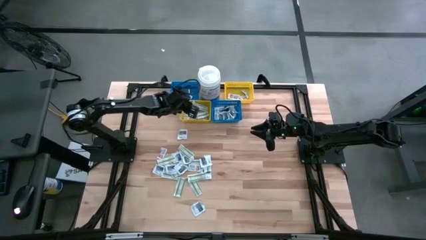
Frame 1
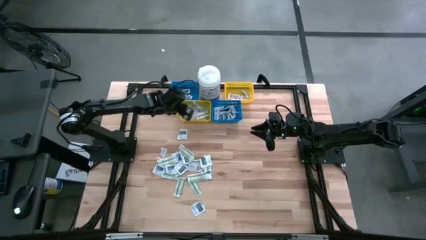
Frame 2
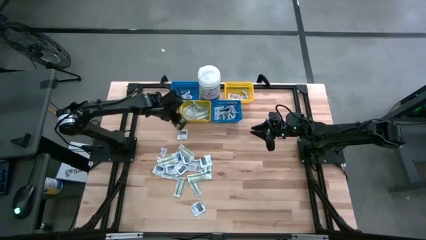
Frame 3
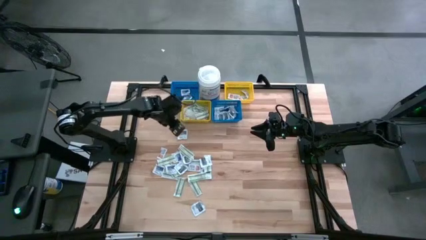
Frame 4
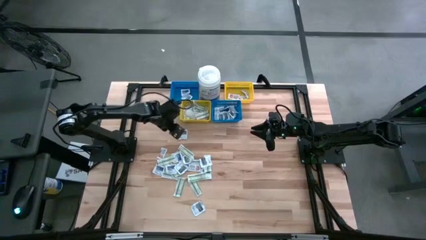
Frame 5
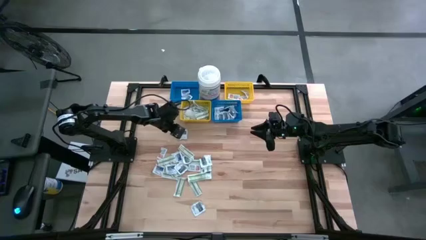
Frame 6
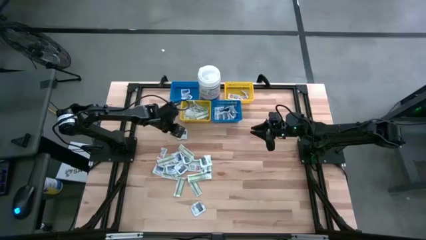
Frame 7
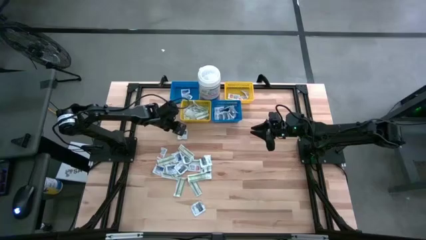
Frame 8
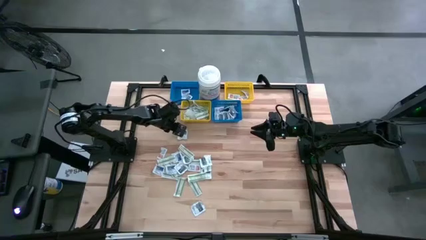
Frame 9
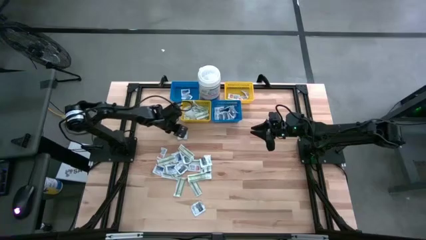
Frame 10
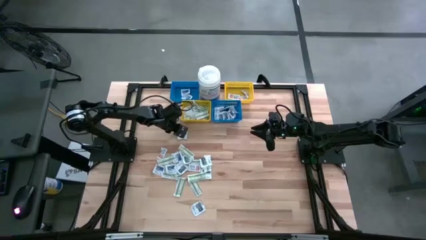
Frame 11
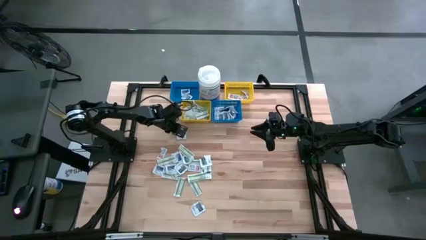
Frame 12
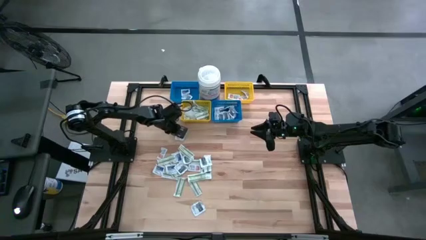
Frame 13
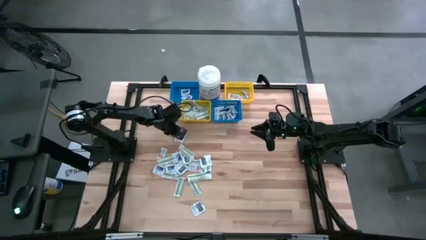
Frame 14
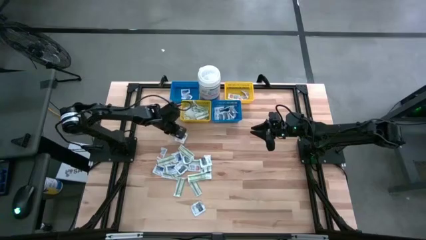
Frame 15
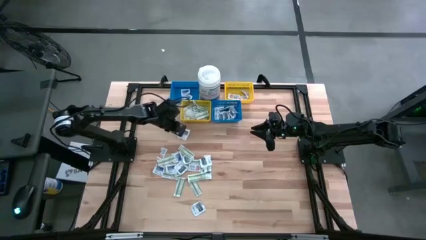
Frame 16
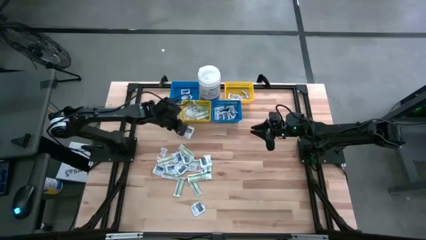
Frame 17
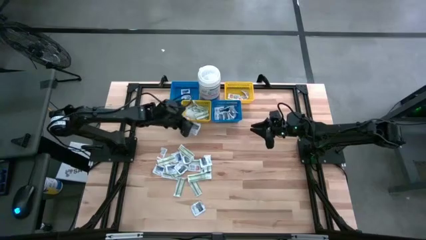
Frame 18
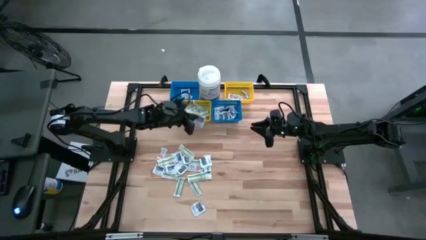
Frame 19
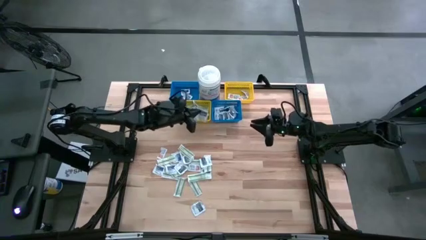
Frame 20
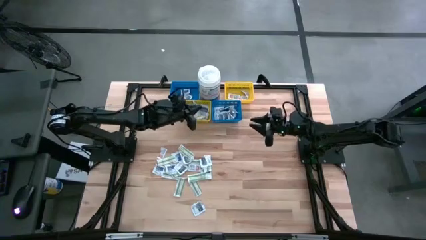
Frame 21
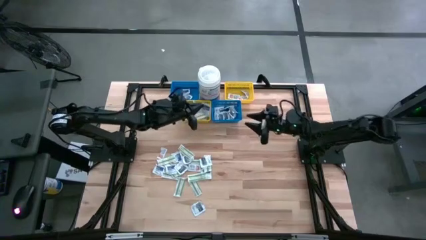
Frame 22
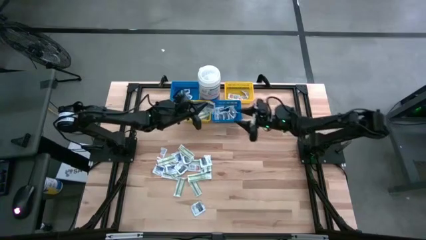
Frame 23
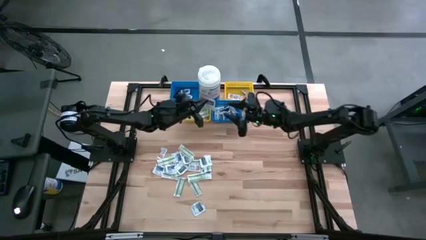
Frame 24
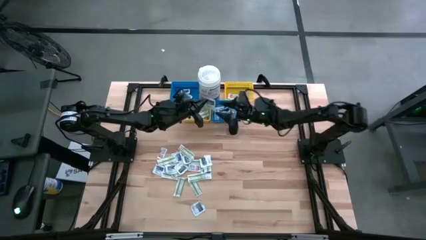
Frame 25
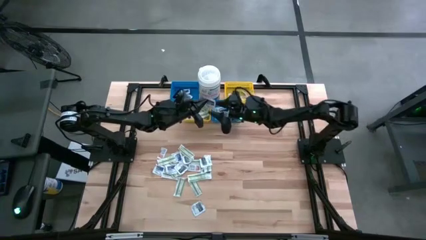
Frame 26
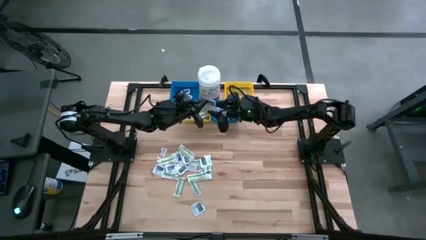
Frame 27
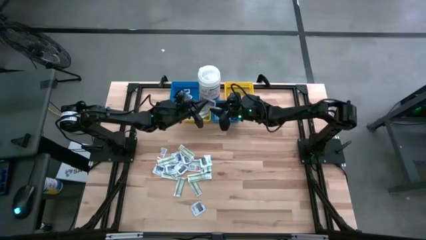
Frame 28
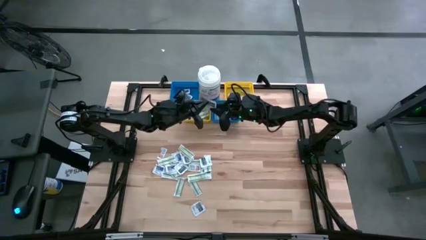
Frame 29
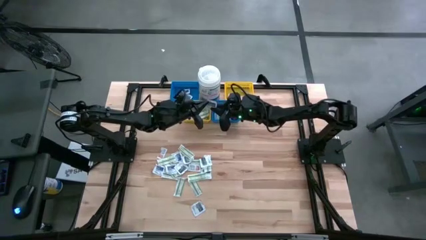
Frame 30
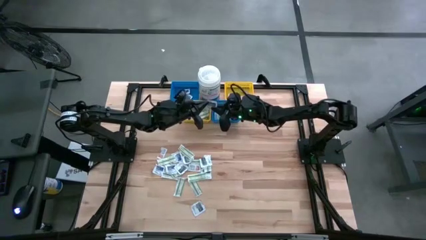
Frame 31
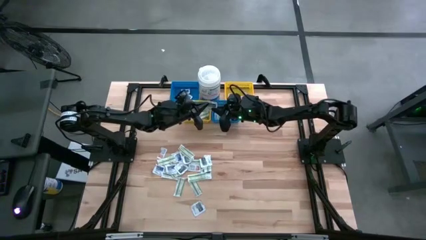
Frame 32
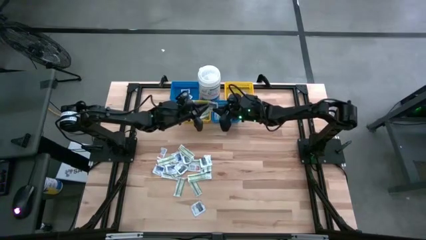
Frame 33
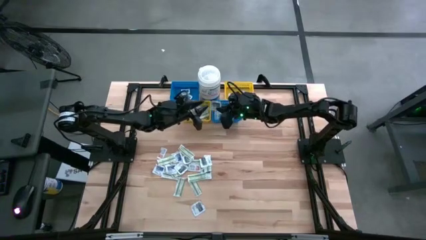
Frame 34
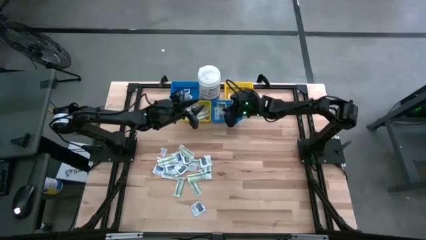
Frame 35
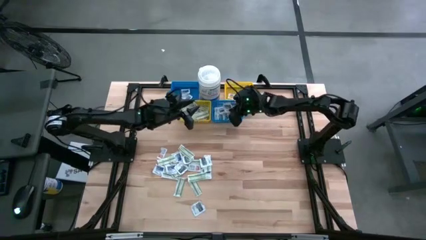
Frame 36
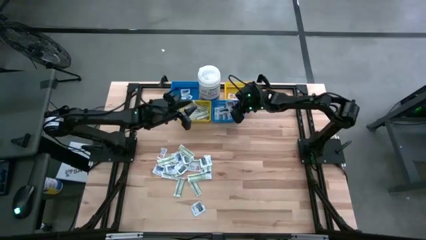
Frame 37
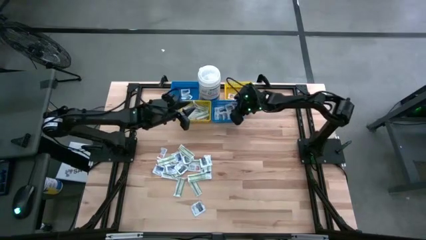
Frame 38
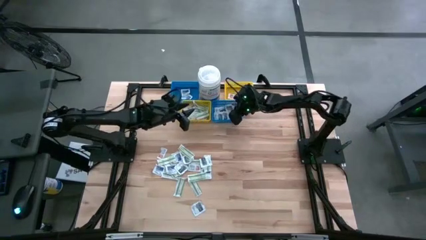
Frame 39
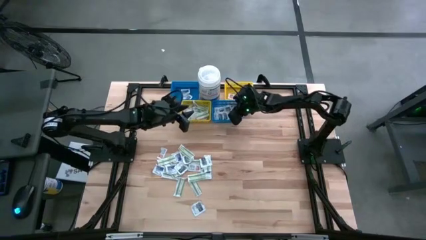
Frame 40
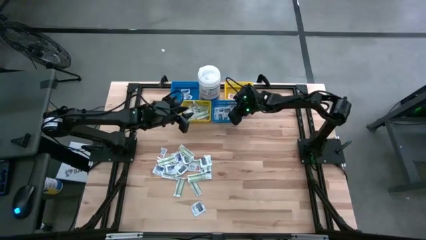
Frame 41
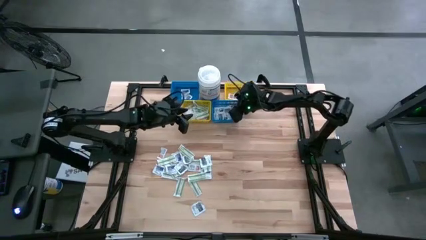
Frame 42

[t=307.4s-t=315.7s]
Task: Pick & Place First Aid Supplies
Put the black towelette pack into the right blue bin

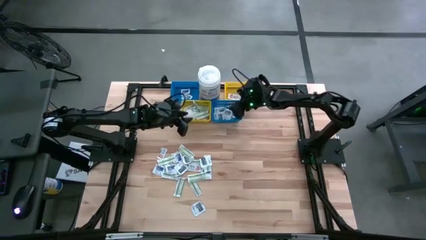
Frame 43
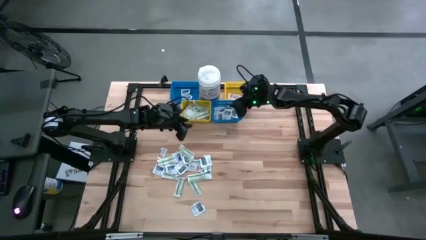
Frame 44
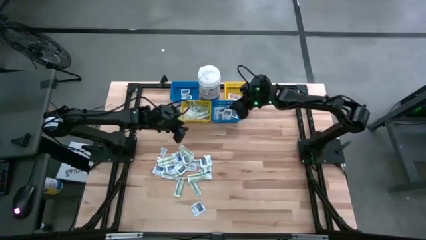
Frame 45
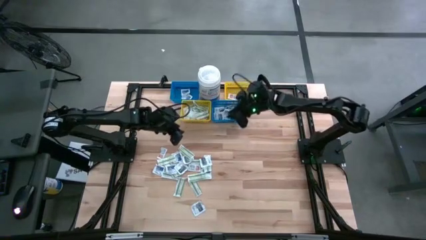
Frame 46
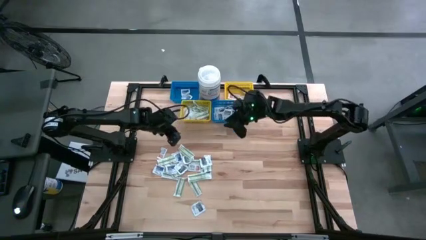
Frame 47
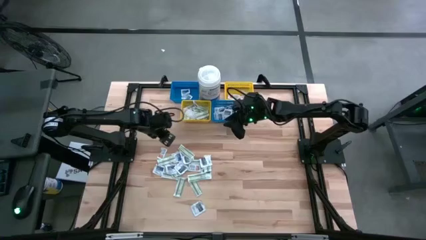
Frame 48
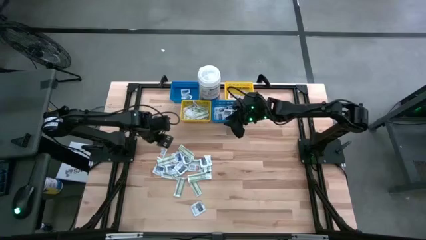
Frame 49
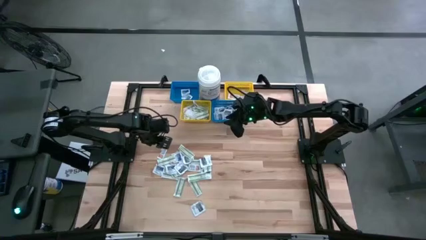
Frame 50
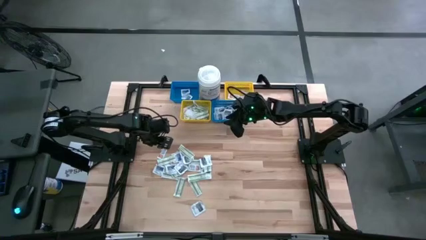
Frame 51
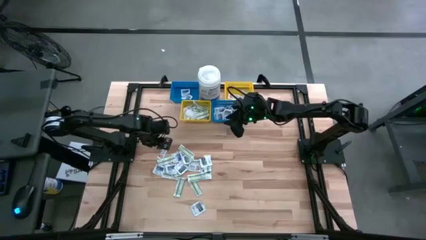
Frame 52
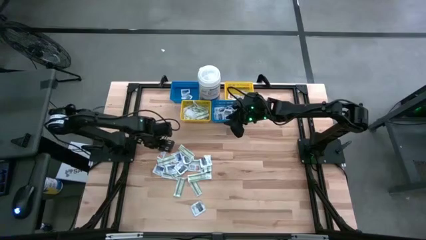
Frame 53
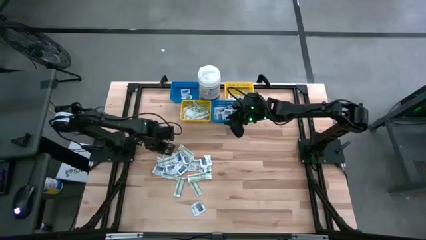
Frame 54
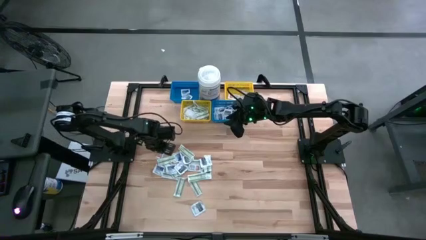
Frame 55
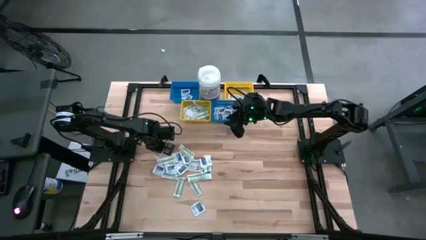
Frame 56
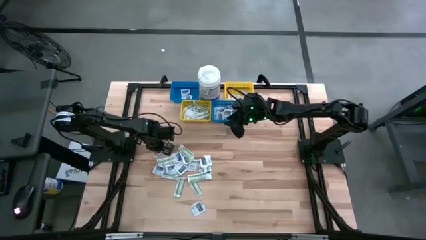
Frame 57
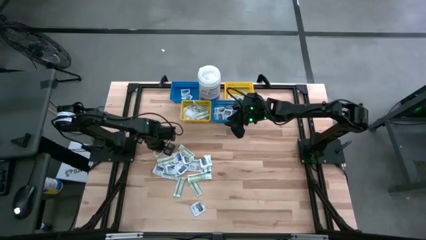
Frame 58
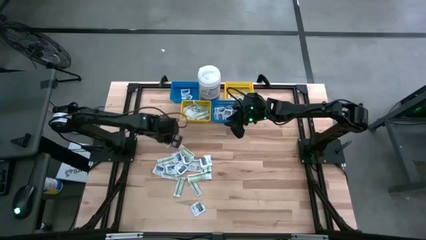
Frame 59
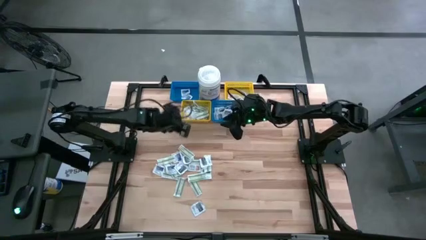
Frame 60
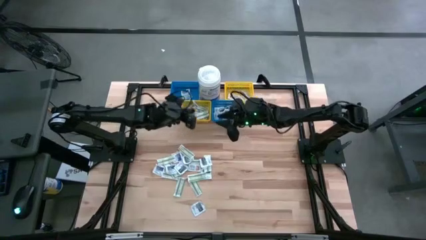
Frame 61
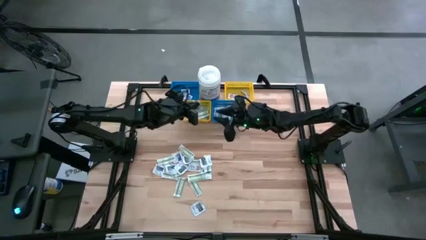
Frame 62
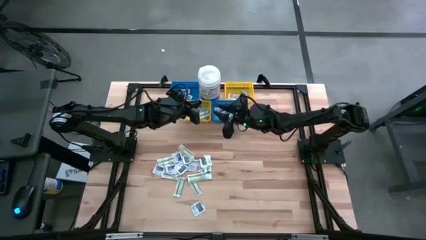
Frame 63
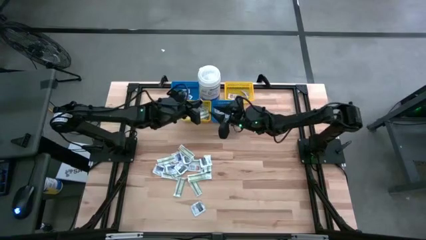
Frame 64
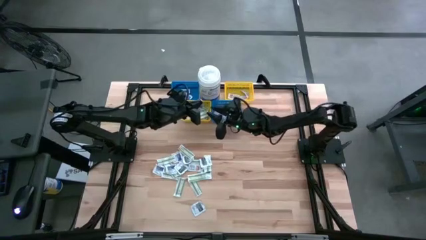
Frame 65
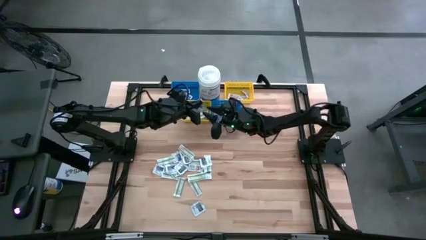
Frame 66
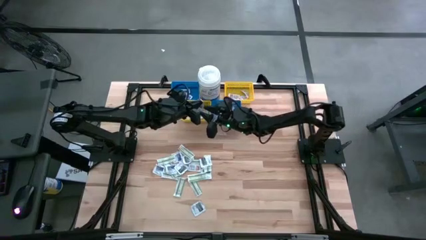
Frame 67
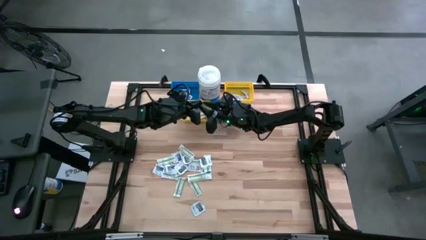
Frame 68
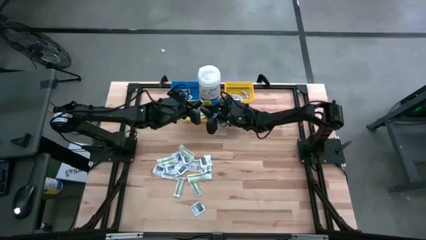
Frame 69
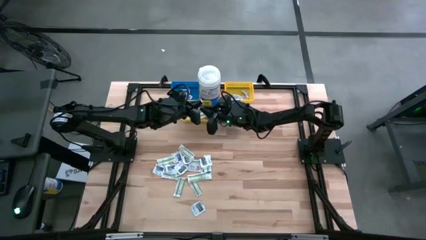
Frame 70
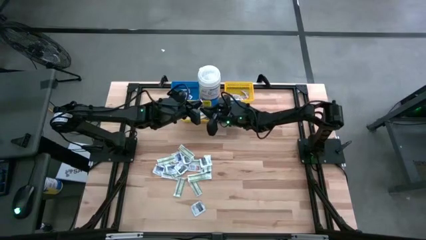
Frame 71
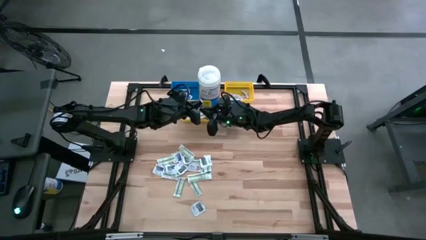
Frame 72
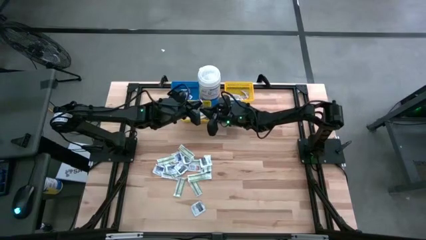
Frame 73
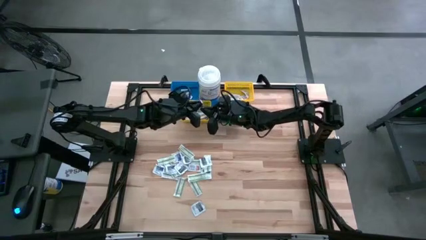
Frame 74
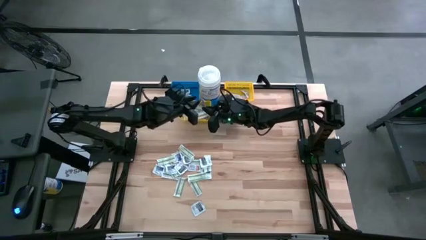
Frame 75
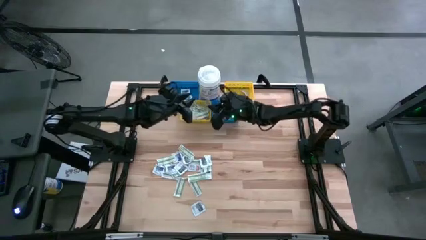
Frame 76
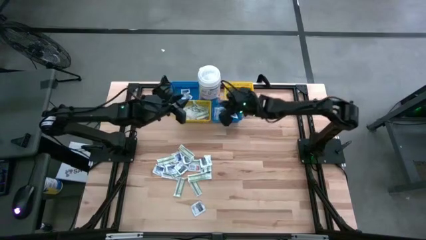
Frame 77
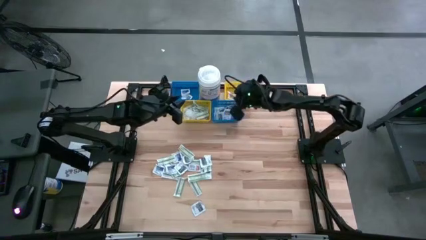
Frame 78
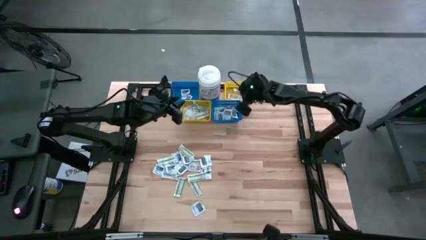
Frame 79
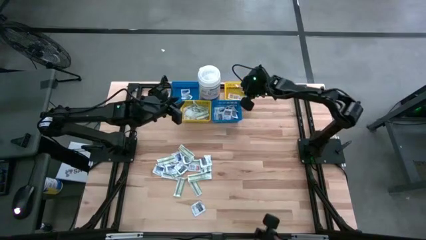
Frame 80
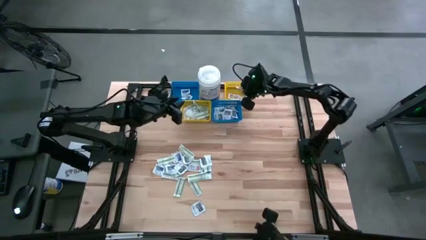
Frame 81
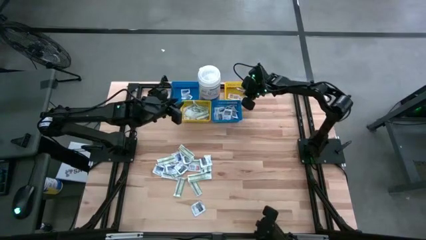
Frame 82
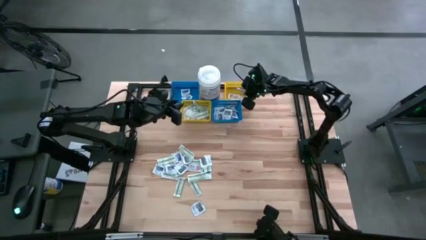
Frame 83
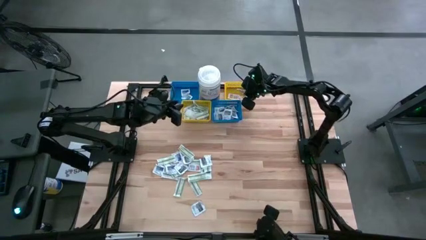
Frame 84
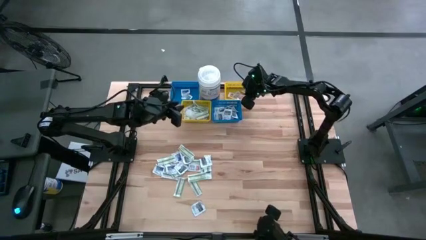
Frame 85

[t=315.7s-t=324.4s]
Put the orange ointment pack into the right yellow bin
